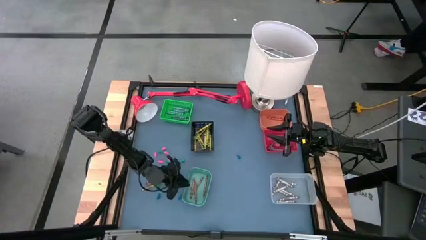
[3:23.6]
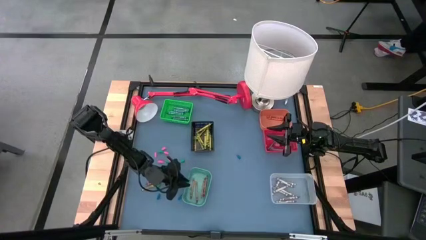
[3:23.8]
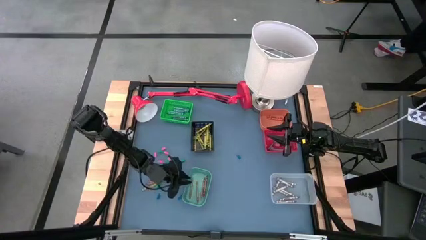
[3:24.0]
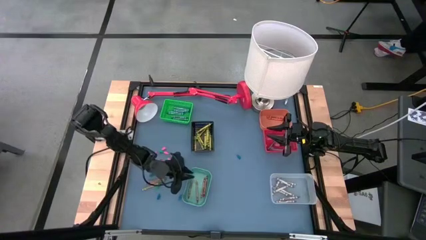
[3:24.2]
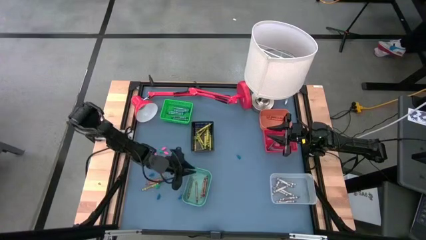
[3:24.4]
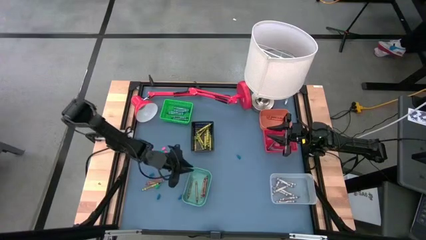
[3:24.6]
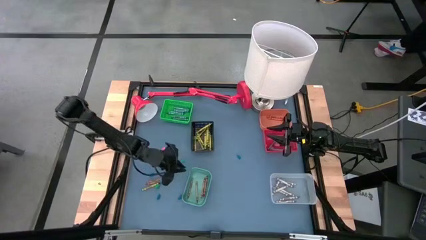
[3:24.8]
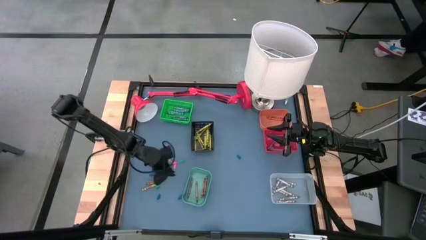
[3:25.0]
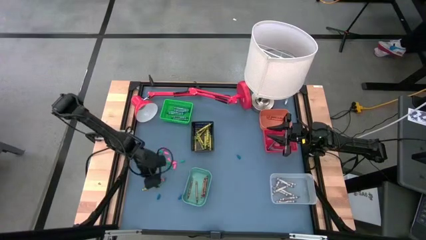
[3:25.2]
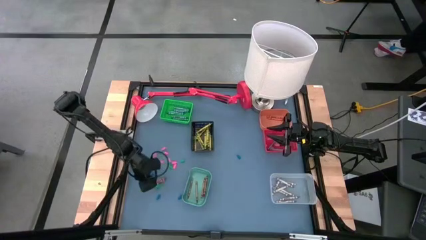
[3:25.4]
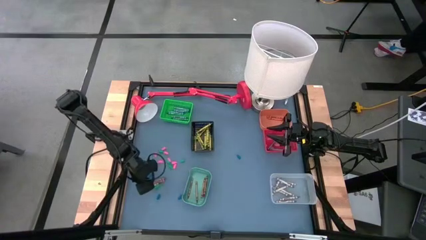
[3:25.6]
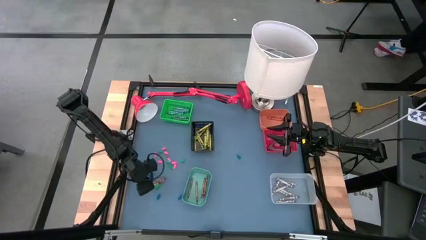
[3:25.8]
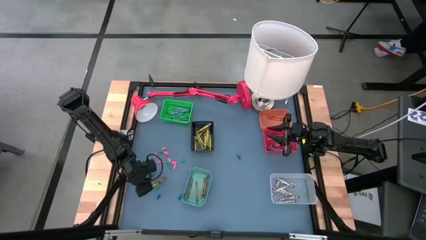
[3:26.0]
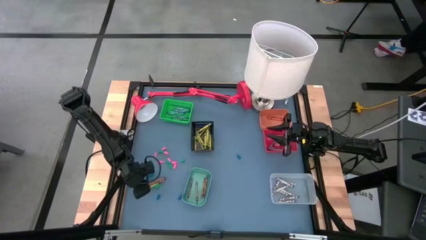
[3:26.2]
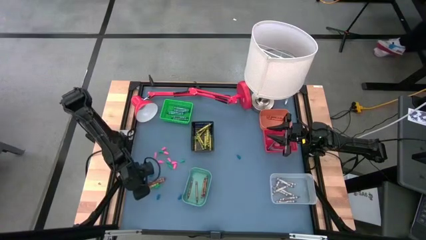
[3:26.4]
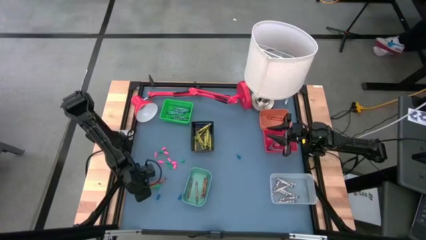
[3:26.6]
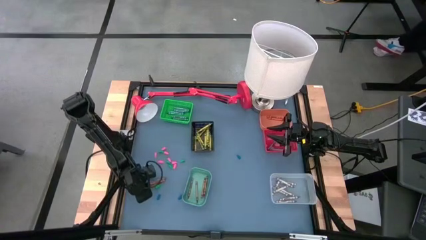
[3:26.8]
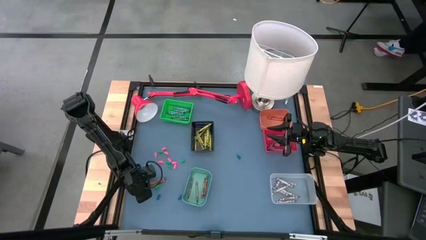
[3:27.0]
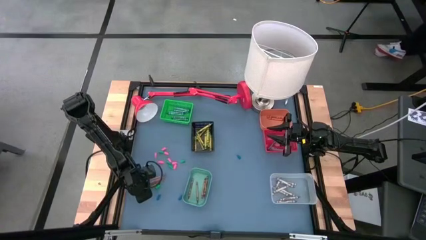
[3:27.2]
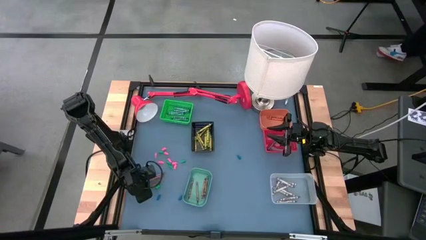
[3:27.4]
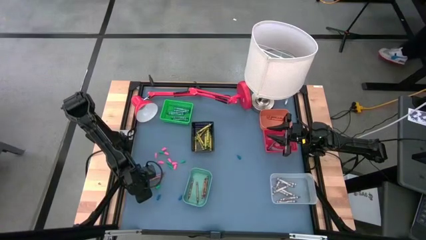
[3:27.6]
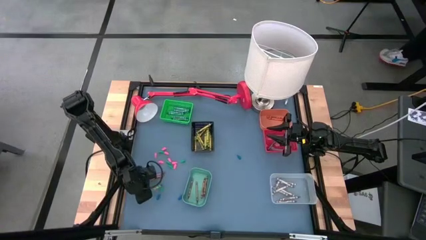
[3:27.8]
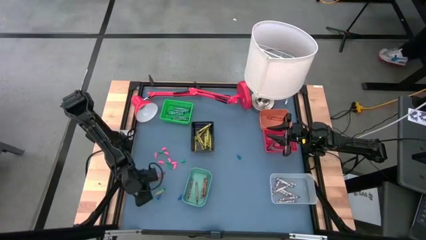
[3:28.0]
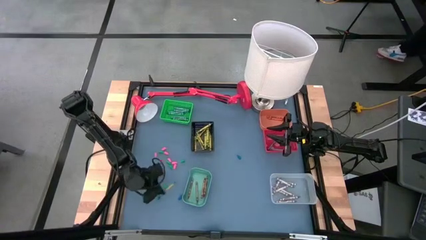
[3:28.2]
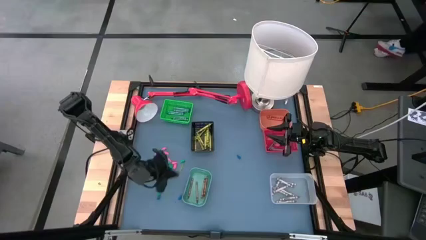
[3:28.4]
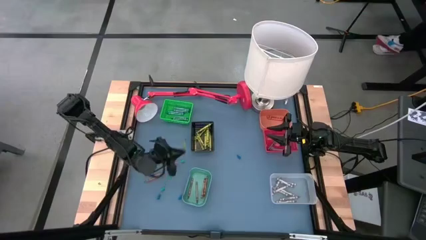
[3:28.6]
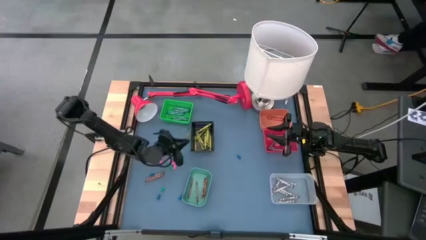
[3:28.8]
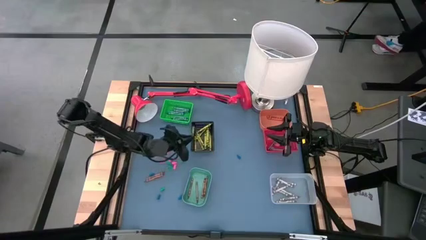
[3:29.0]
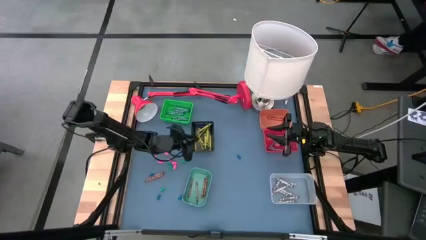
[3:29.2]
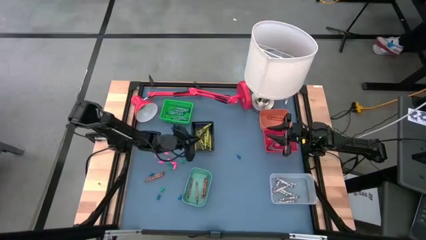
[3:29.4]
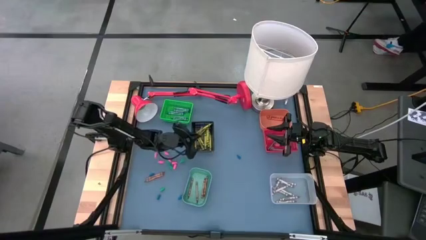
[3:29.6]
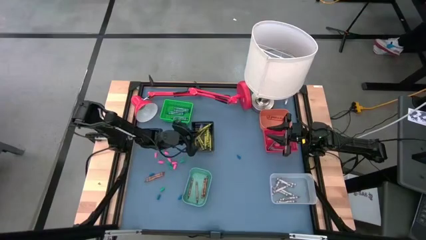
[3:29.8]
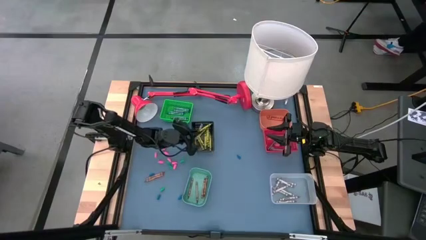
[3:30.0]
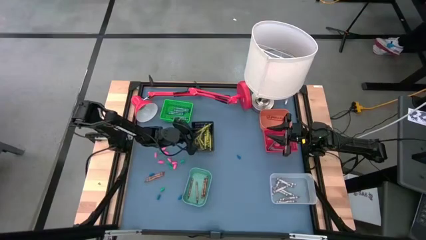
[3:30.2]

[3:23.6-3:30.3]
Task: Sort crayons
Put the green crayon into the black bin

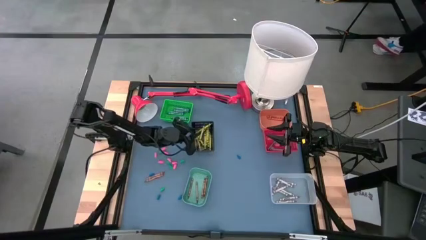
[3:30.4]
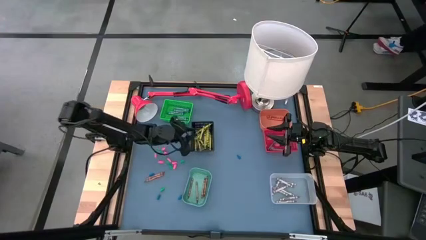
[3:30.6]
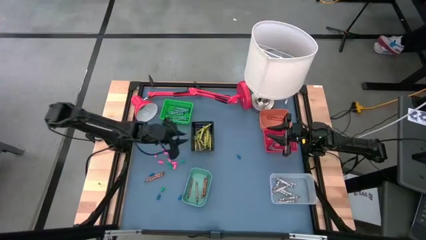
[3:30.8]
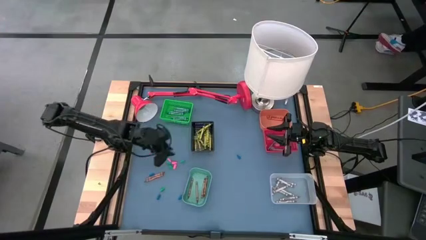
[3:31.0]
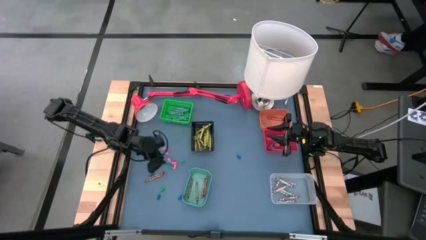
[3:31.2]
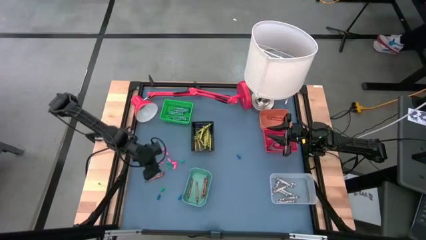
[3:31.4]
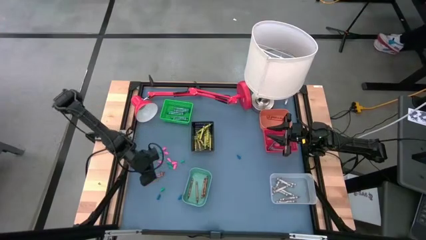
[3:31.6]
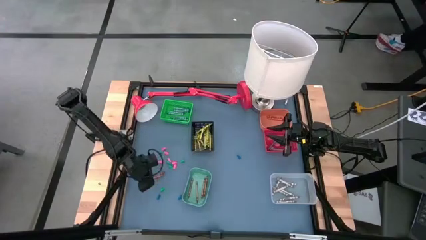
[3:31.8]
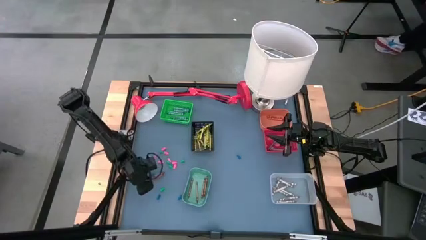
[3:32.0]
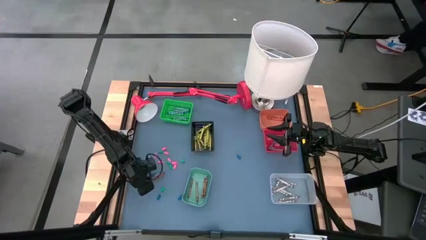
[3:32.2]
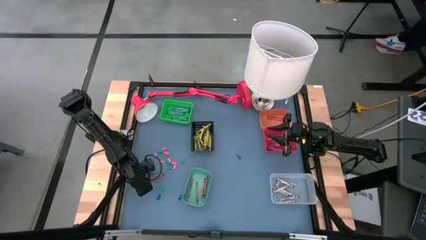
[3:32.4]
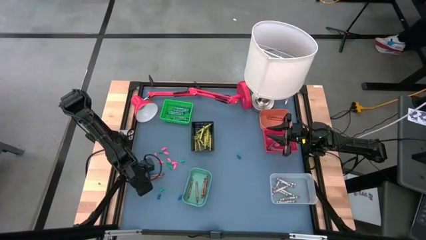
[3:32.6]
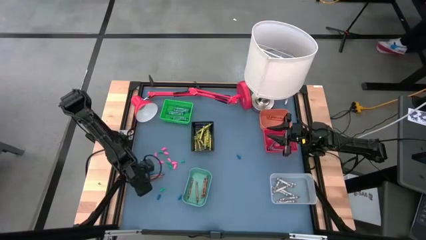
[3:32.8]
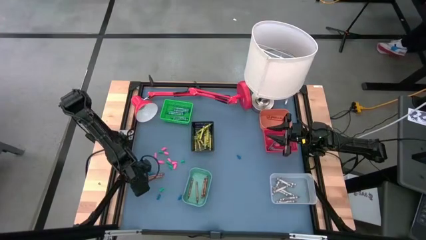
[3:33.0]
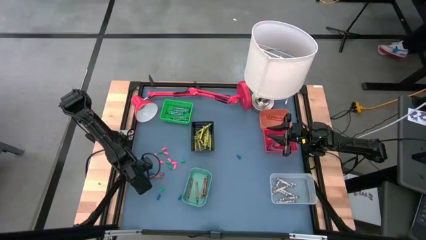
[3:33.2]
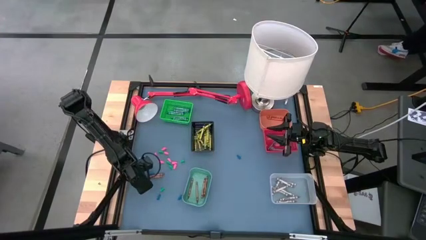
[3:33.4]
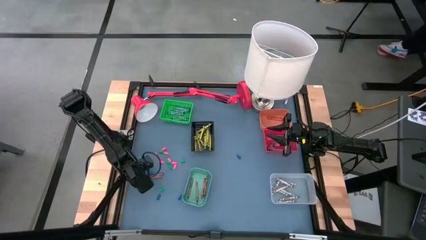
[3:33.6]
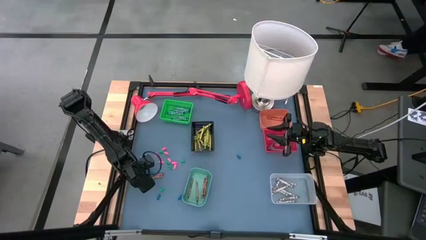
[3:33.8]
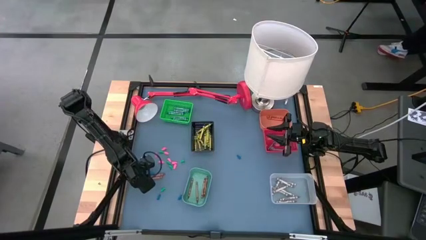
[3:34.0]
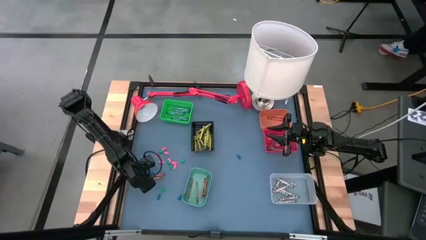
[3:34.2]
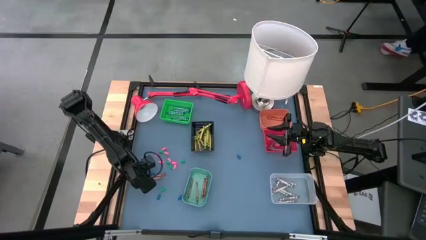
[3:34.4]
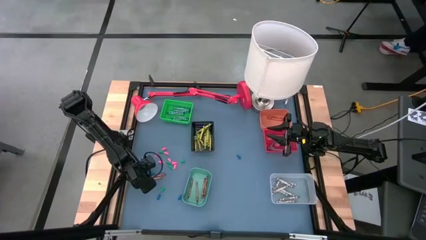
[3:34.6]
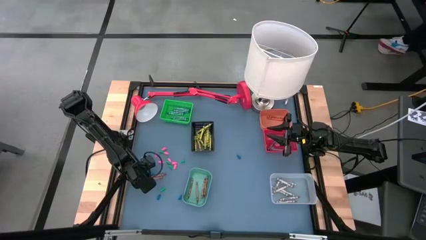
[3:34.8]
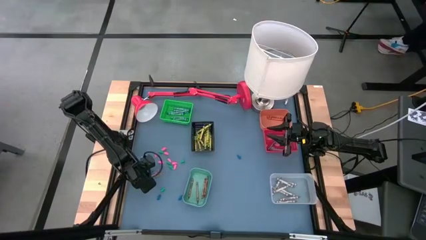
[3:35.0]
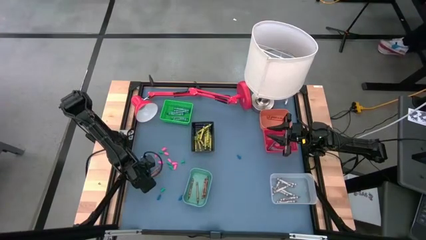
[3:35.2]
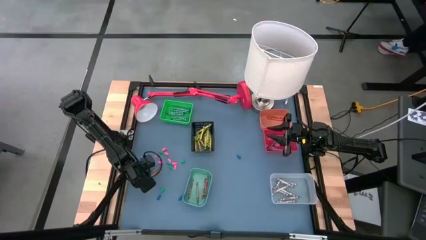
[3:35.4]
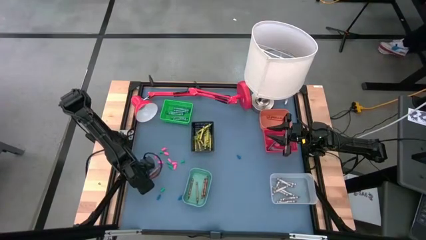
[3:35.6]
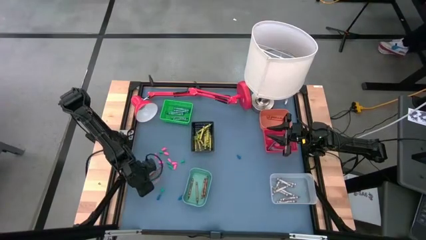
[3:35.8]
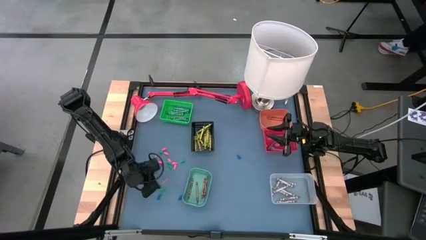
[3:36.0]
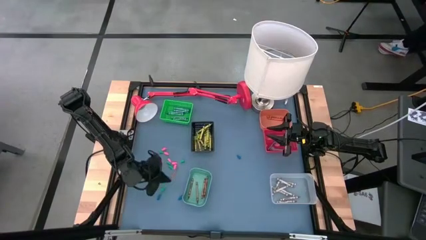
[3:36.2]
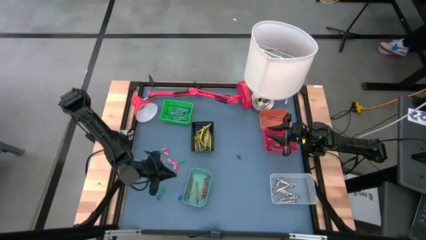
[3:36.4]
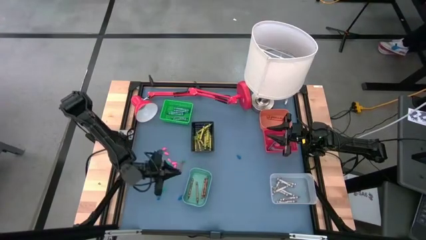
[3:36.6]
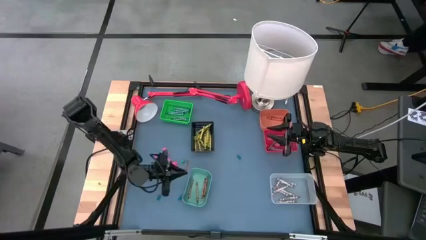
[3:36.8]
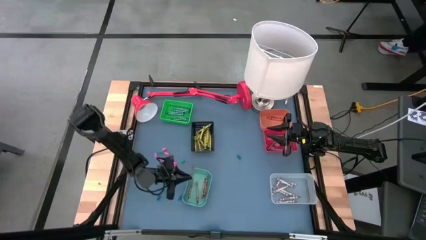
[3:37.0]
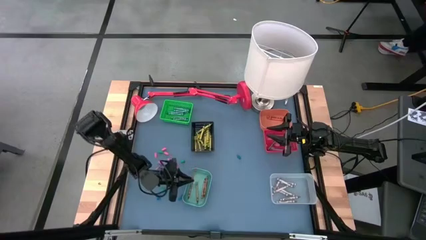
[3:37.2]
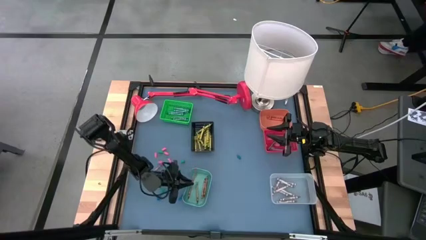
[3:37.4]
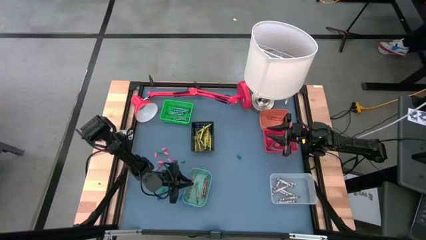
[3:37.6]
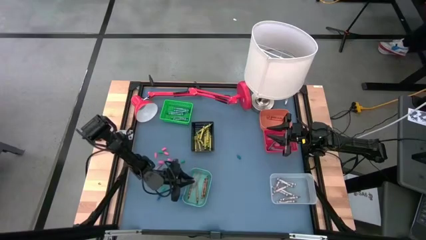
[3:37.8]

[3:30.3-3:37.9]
Put the brown crayon into the light green bin
